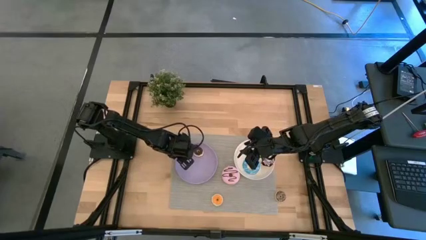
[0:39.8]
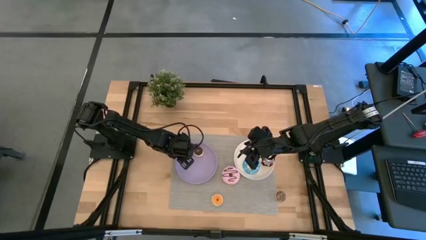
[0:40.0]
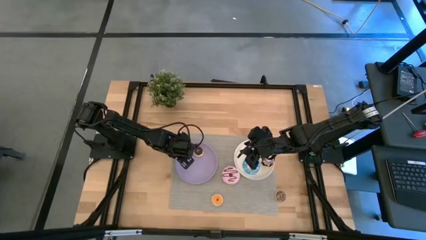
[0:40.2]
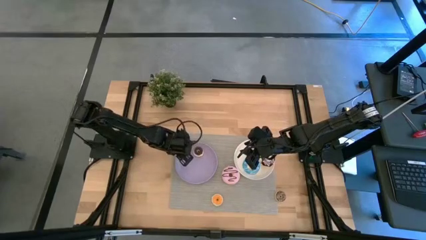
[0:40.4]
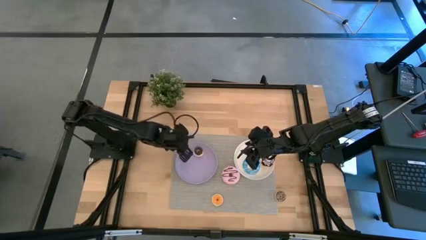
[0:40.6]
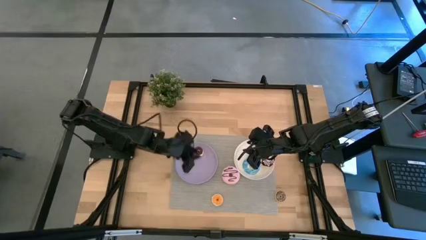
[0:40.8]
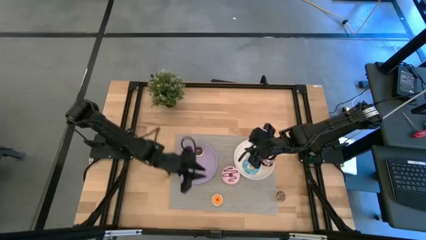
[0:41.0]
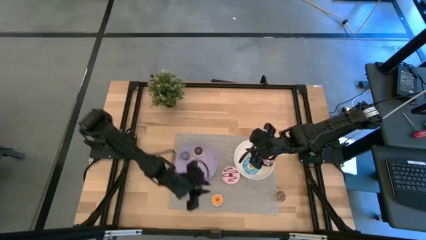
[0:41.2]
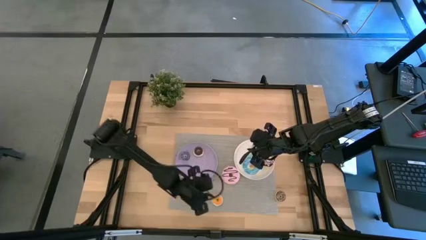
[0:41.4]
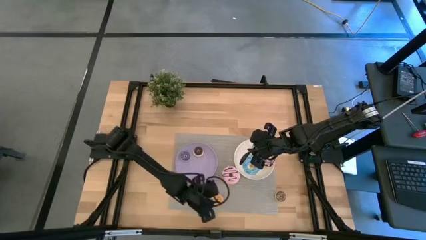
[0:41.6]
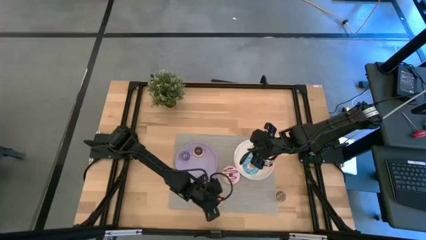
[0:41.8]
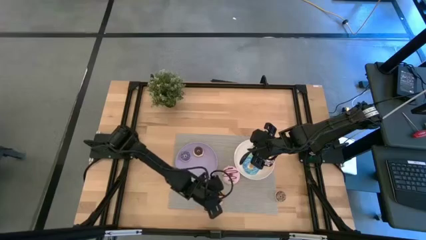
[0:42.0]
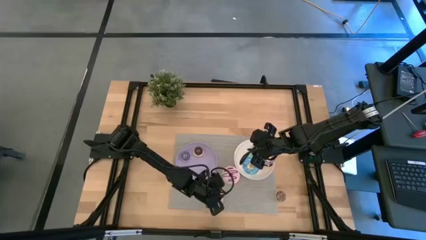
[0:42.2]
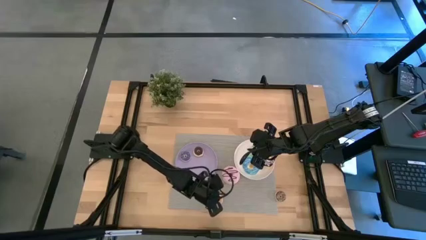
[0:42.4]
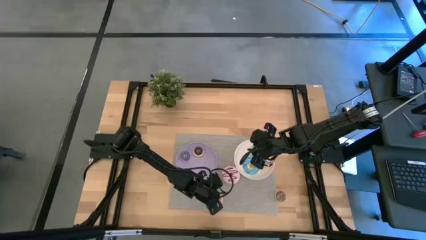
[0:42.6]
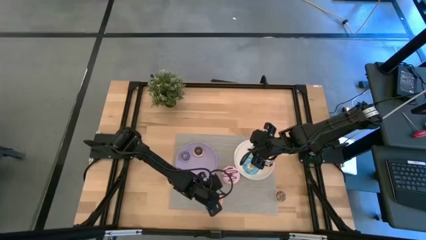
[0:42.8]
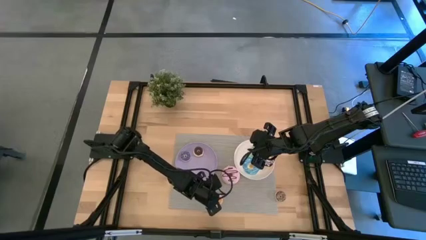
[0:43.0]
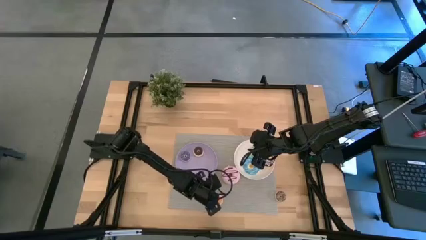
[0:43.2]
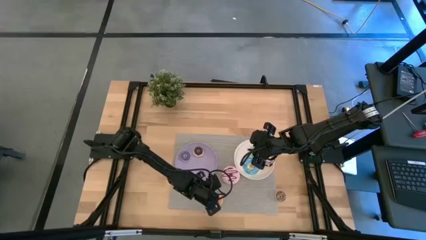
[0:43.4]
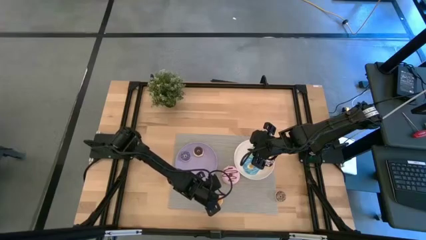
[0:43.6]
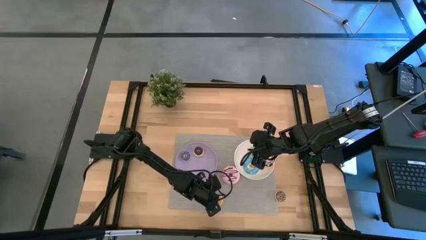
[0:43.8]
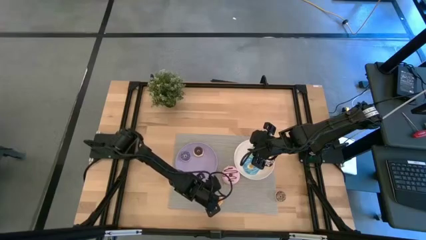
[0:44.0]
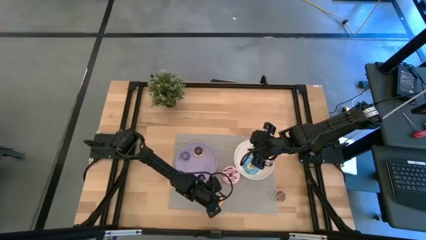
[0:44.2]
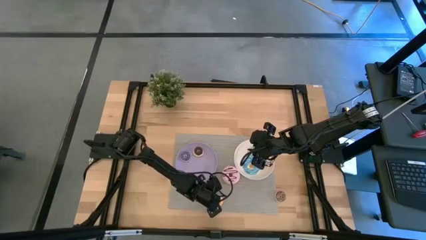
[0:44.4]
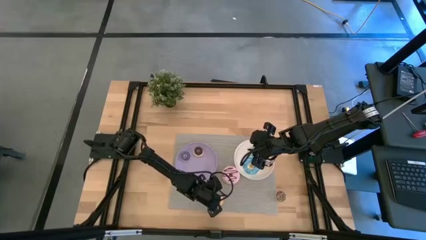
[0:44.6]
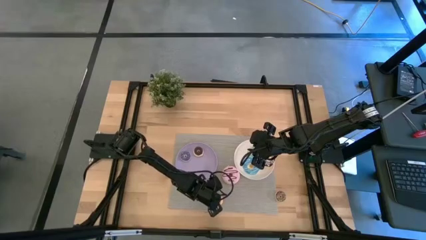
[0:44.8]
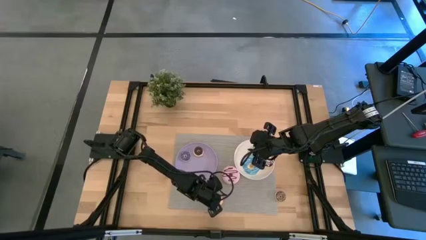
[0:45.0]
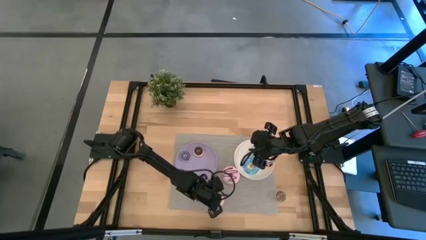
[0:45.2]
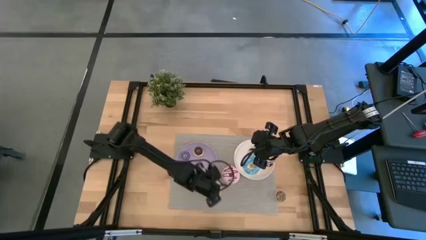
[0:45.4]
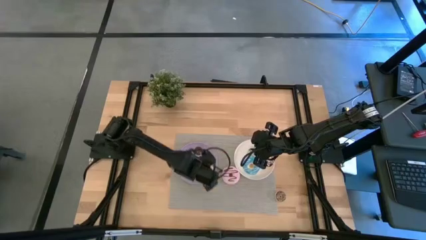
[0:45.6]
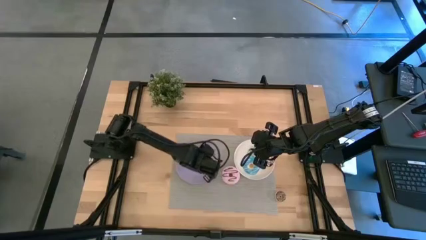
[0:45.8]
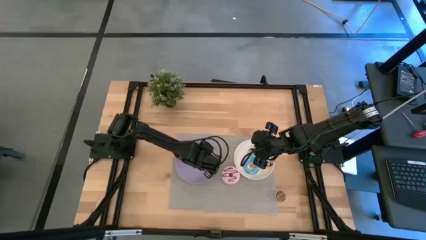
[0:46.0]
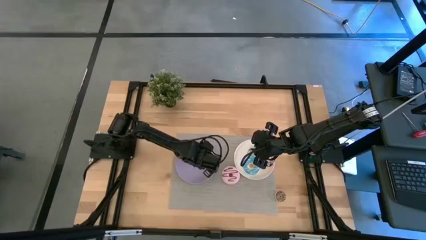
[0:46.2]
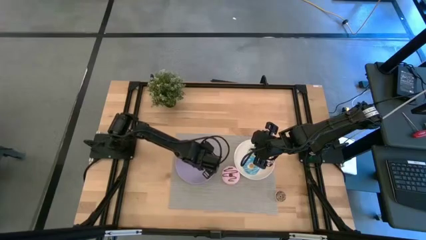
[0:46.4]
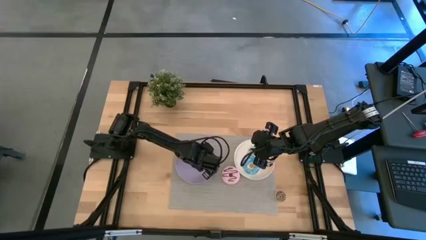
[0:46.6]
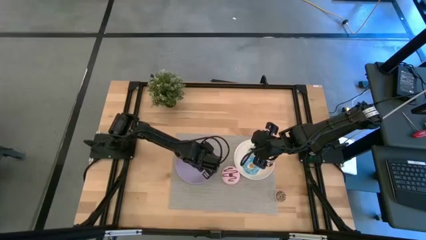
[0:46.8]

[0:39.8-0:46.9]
Task: Pick & Place donuts
Put the small orange donut on the purple plate

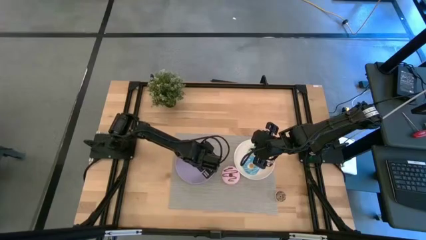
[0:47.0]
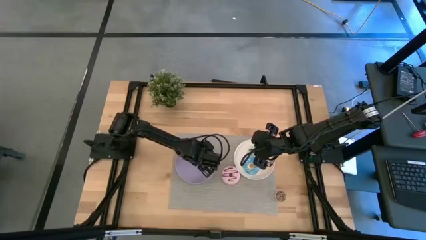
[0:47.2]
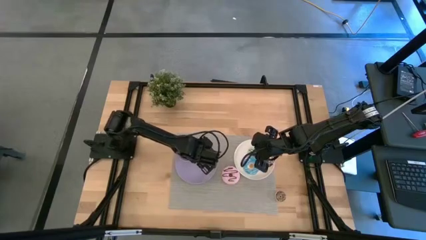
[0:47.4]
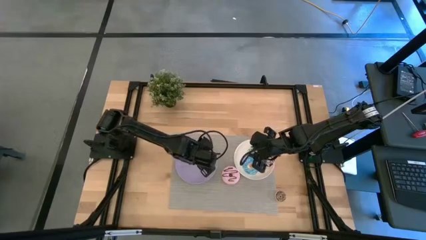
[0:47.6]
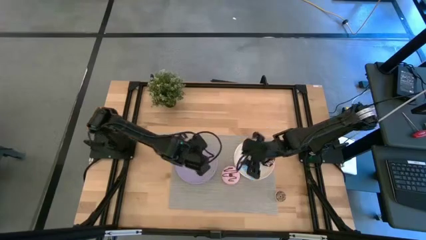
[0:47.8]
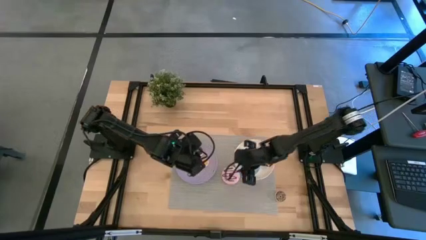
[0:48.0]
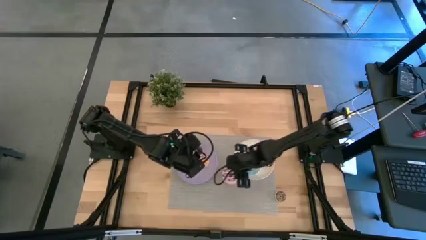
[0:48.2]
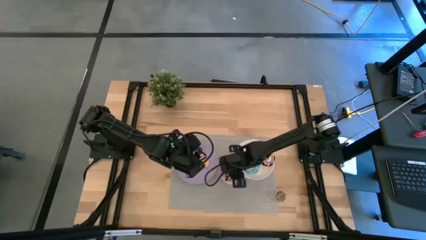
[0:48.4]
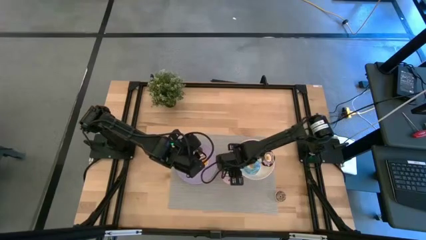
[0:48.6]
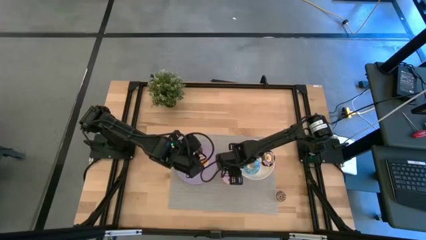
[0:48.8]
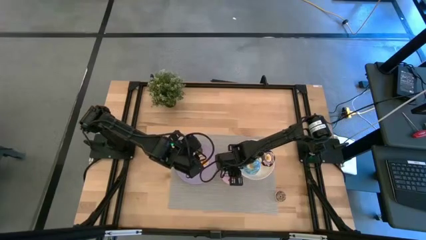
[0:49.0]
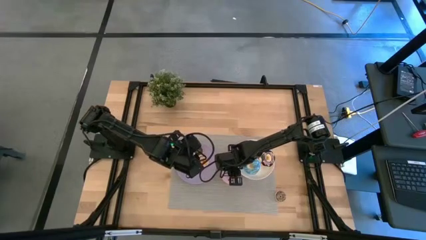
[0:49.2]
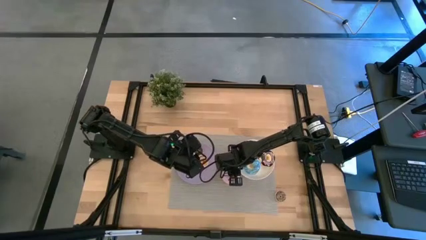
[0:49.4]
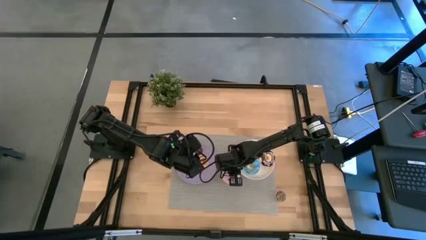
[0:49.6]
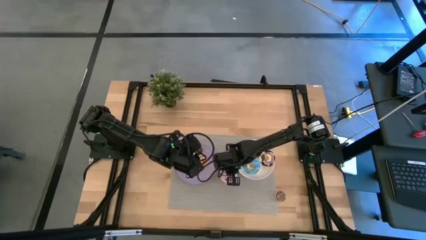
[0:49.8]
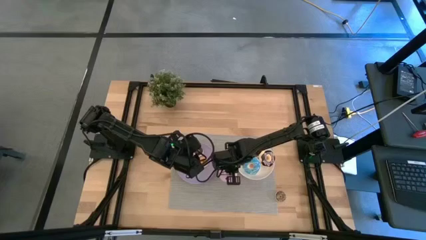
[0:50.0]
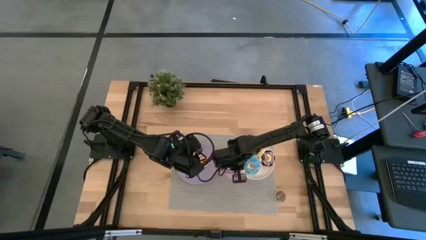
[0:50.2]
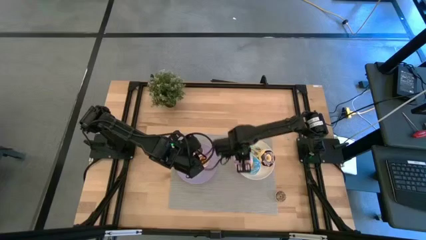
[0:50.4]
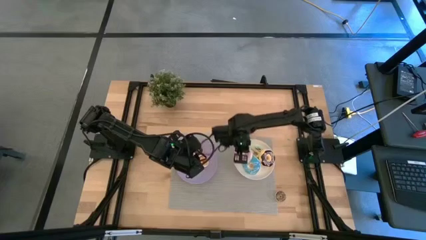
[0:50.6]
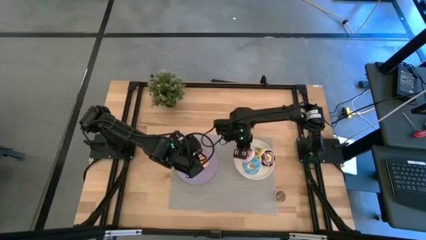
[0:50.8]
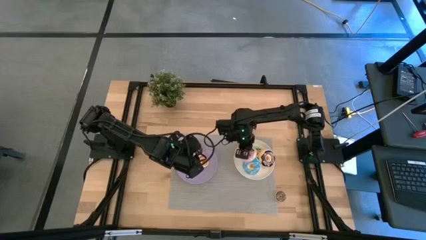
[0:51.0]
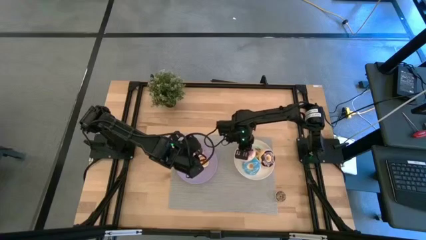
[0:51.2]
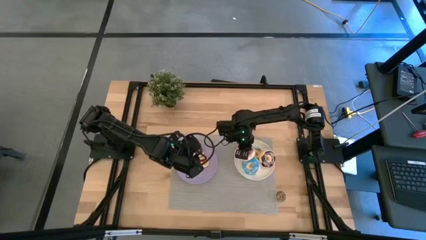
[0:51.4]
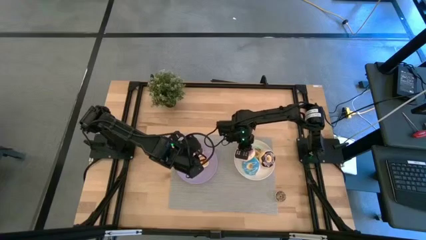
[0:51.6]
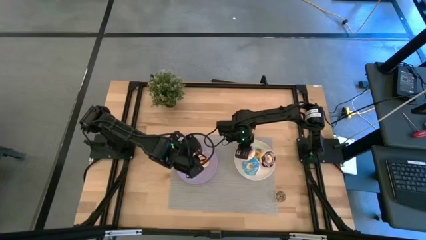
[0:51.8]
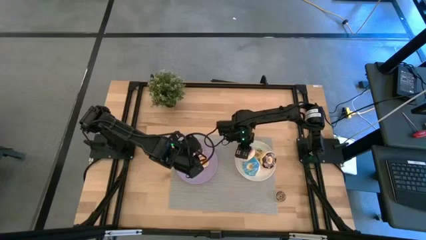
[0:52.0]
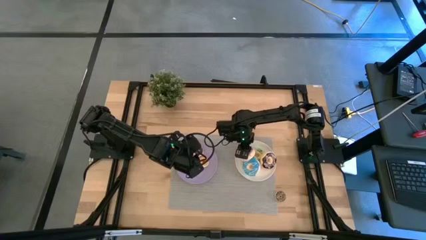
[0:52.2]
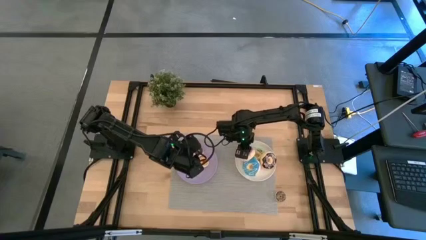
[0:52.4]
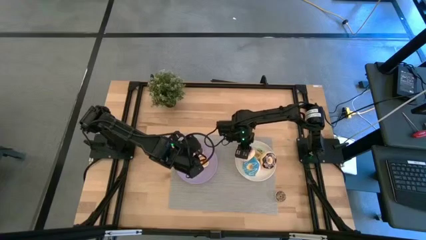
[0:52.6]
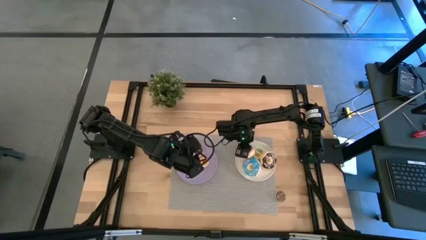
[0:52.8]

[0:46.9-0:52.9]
Put the large purple donut on the white plate

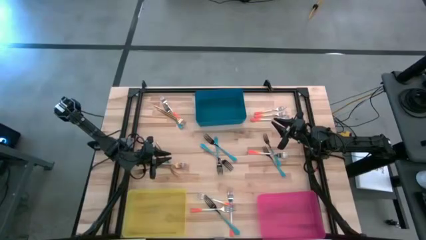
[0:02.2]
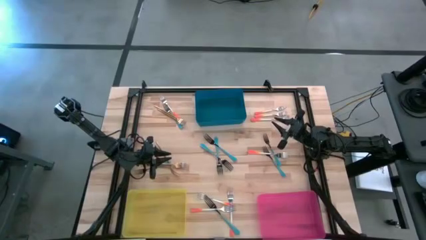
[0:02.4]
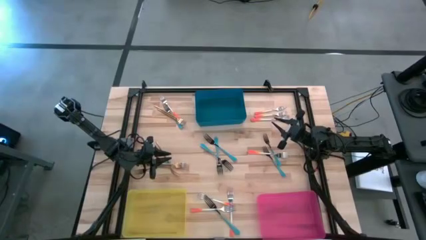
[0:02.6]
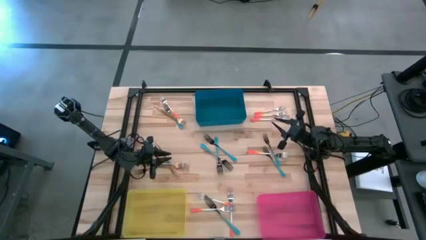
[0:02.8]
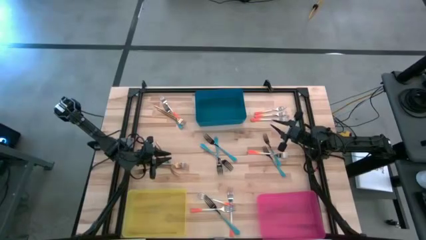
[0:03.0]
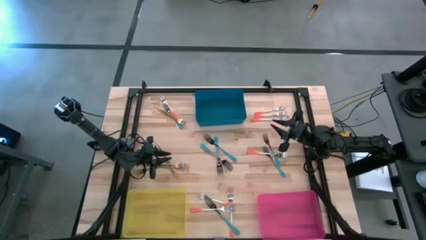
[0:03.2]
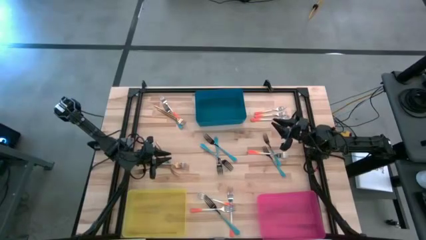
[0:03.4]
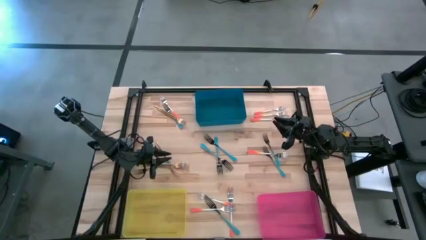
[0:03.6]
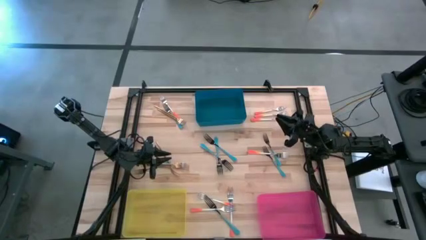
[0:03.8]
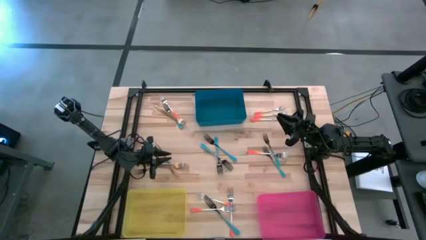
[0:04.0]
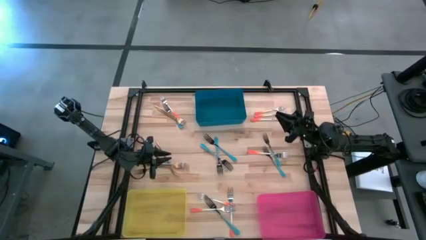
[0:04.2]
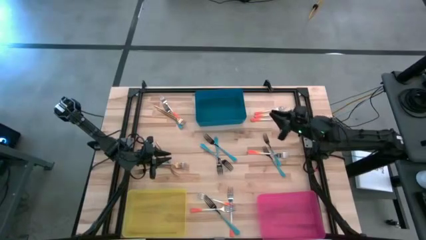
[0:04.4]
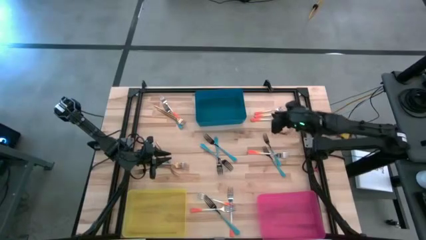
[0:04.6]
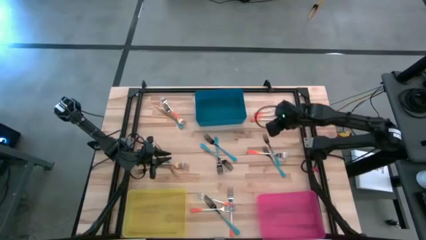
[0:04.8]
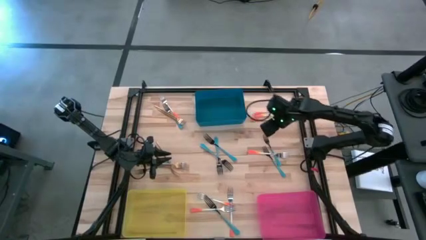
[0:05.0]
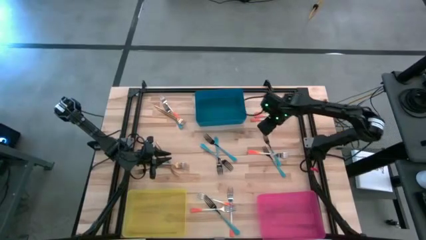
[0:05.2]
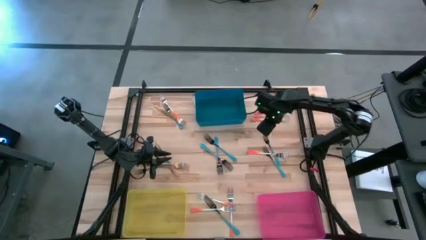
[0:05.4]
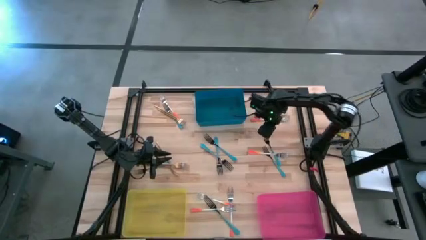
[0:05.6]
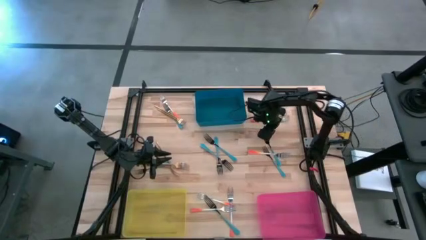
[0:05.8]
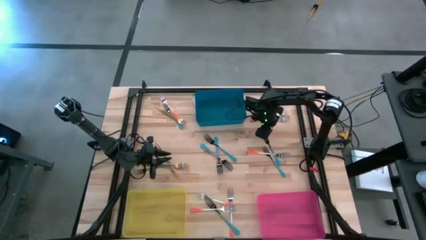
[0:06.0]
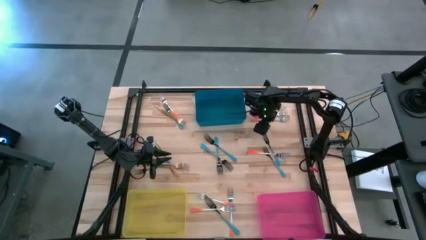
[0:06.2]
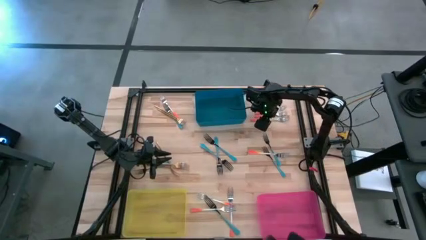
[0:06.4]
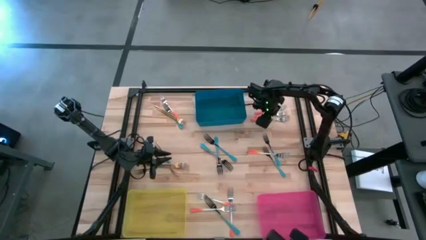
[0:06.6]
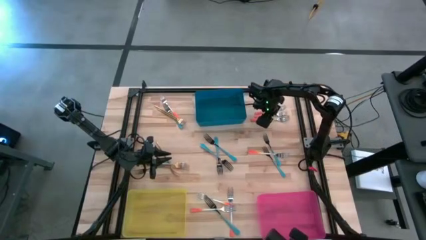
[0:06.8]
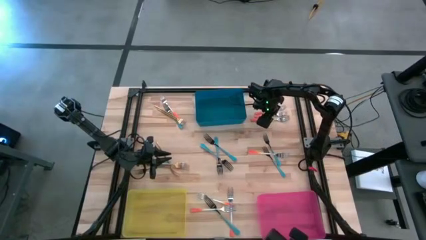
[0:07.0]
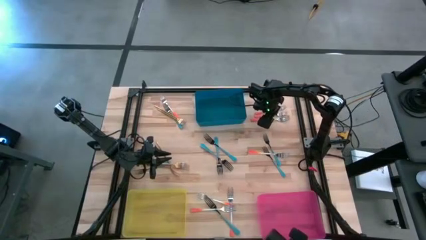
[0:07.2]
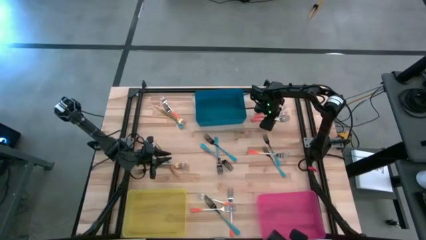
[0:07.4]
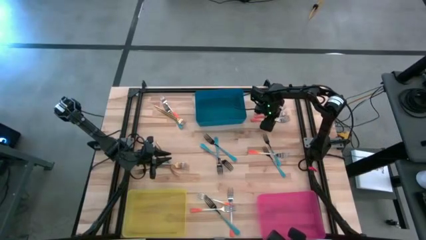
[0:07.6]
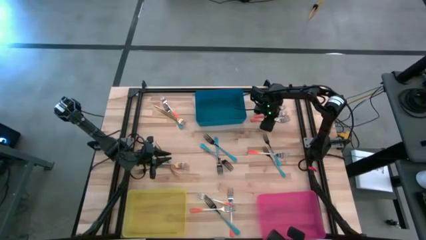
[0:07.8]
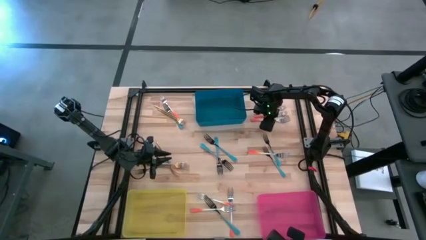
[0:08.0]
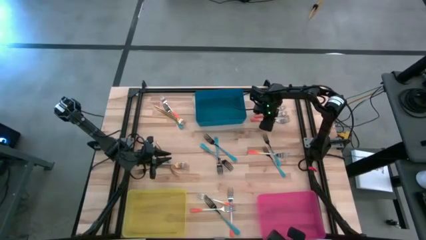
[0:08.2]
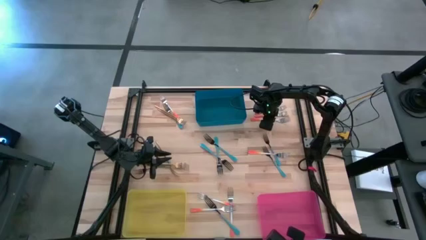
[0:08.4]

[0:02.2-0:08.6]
Task: Sort silverware by color (type)
Put the orange fork into the blue bin
